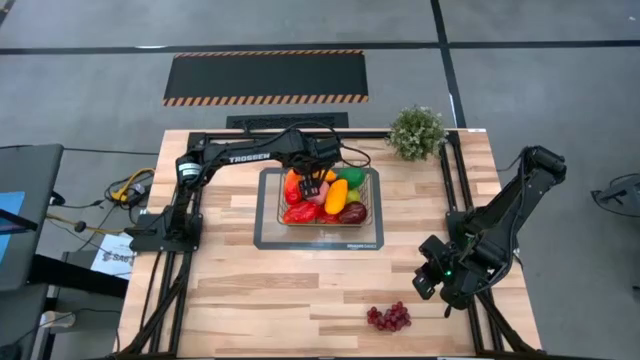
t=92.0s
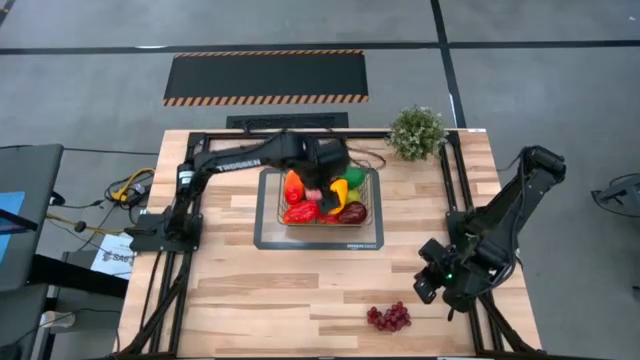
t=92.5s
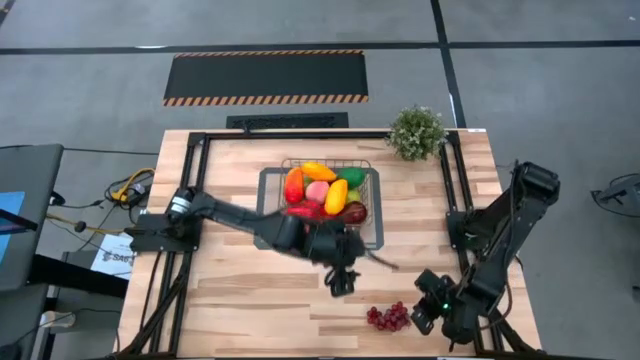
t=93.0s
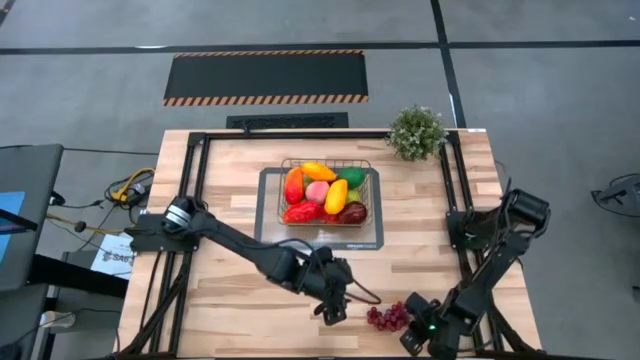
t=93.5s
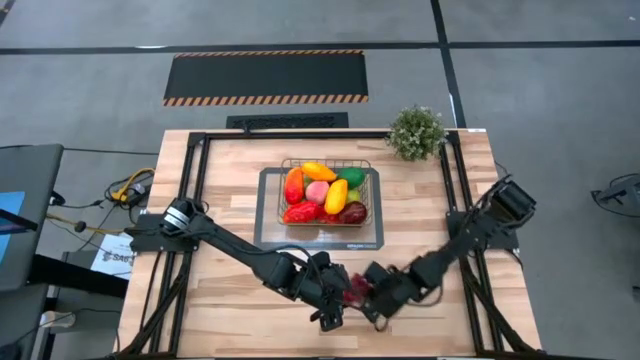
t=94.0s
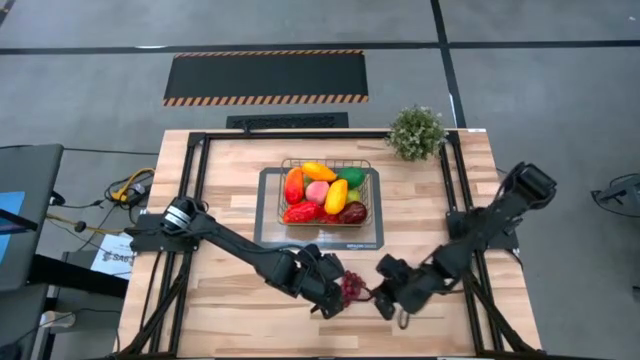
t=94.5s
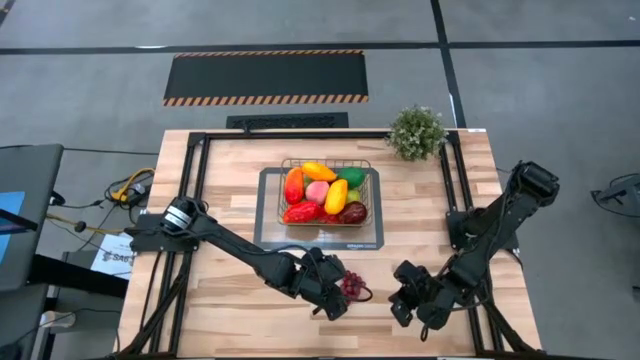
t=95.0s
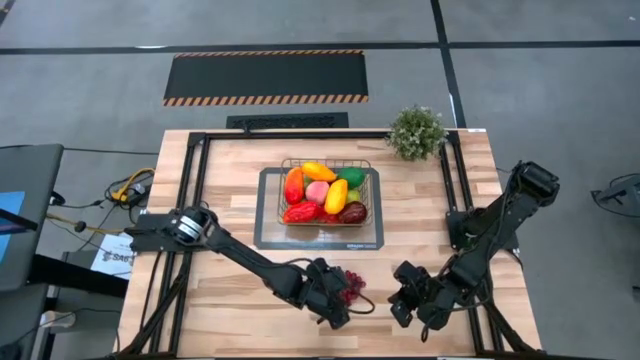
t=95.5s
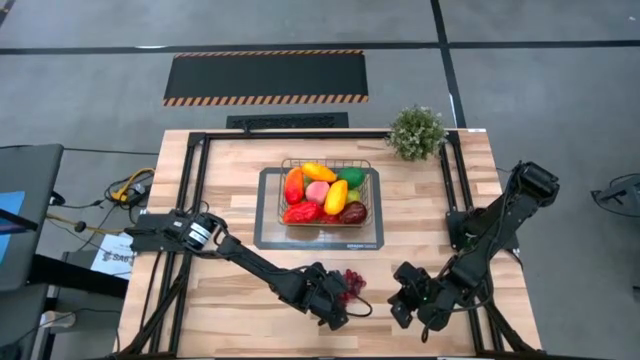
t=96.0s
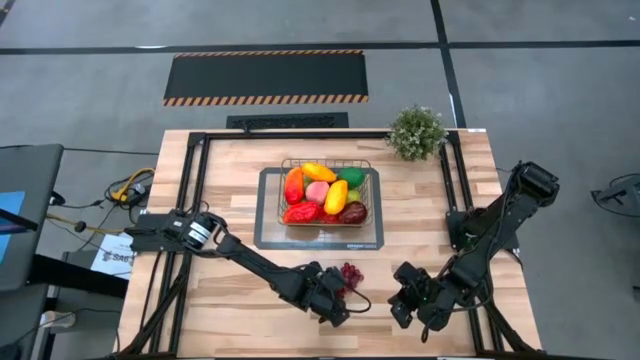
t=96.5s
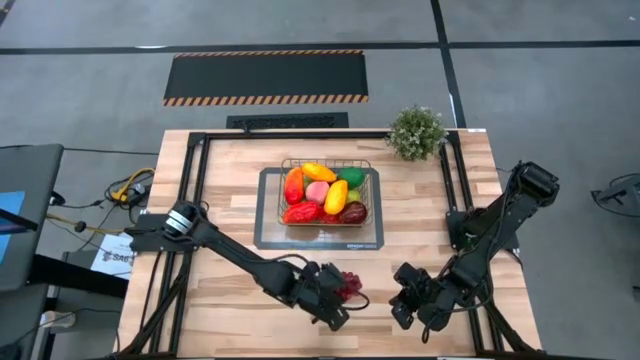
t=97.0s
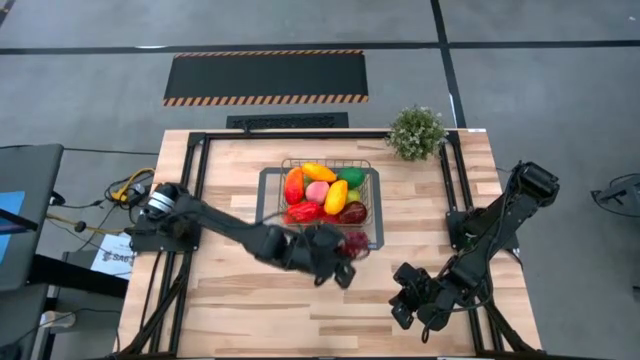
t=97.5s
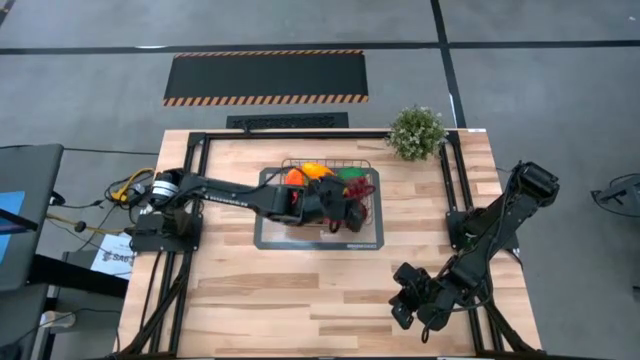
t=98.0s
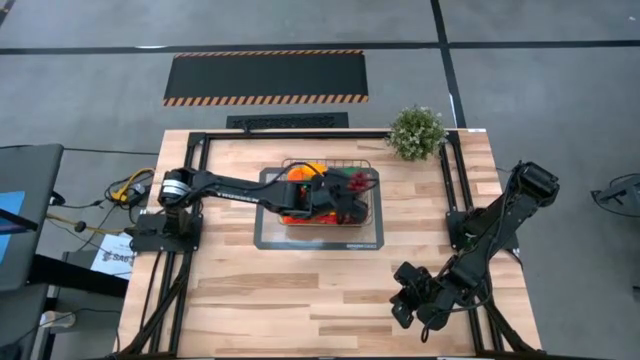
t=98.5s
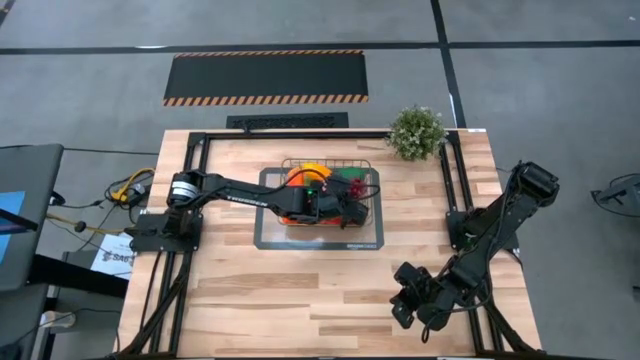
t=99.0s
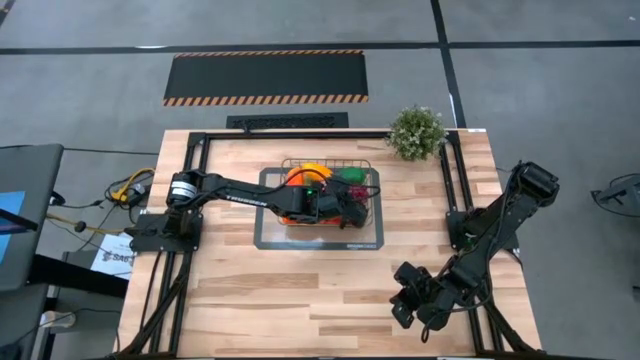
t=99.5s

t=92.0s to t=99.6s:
Task: Build produce basket
Put the red grapes into the bin

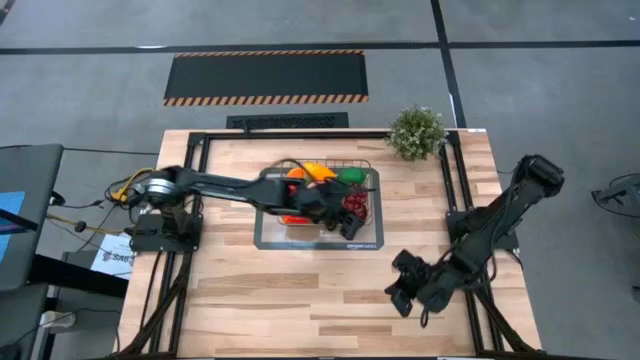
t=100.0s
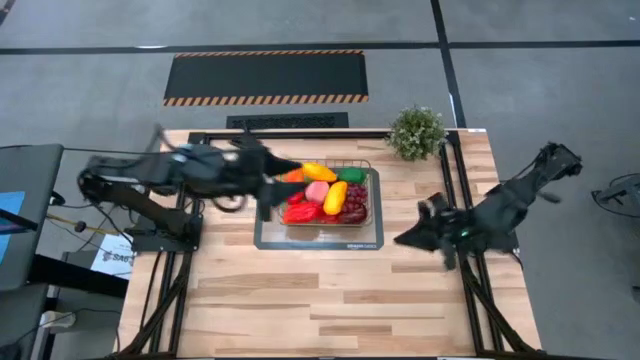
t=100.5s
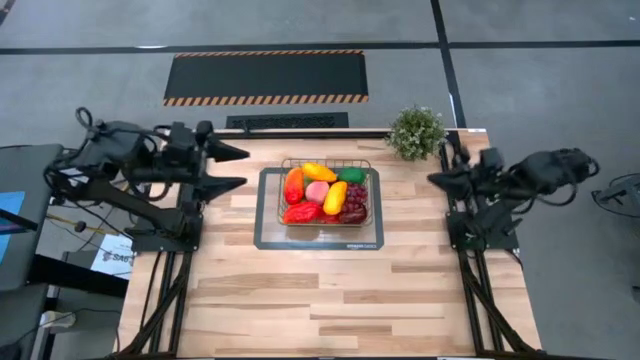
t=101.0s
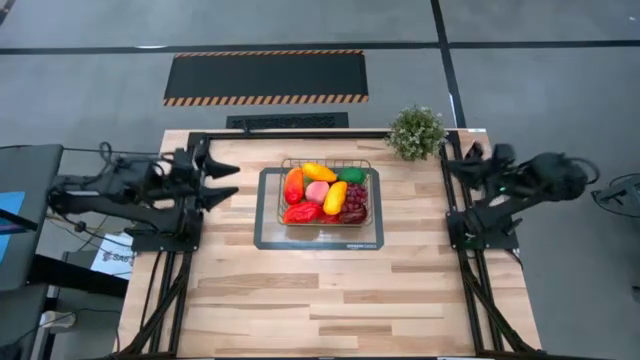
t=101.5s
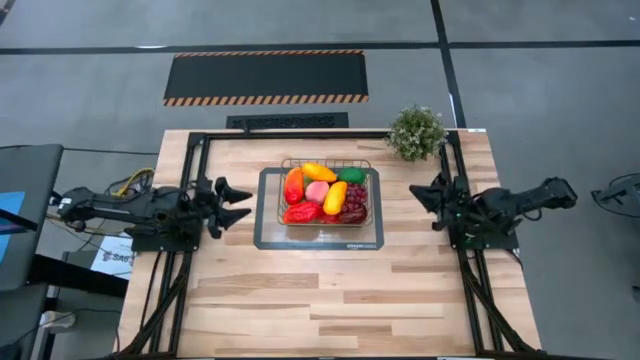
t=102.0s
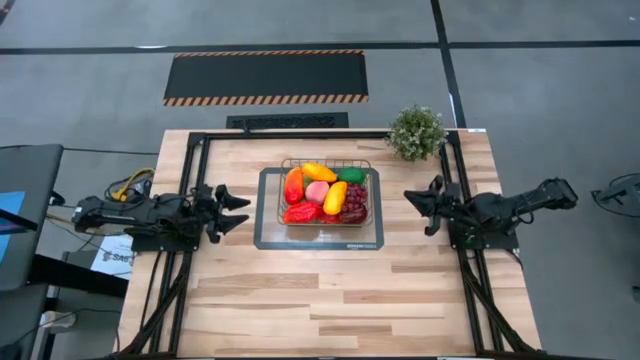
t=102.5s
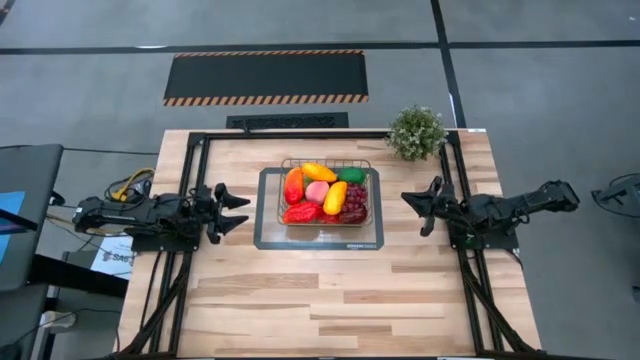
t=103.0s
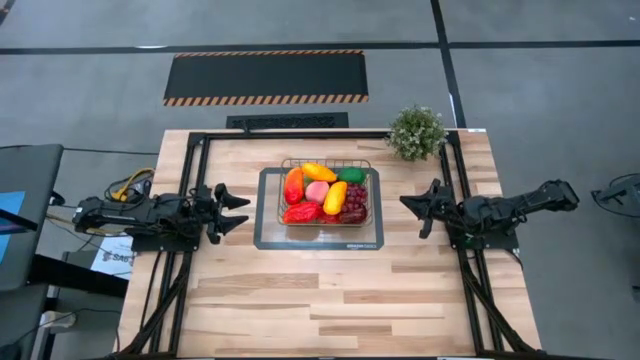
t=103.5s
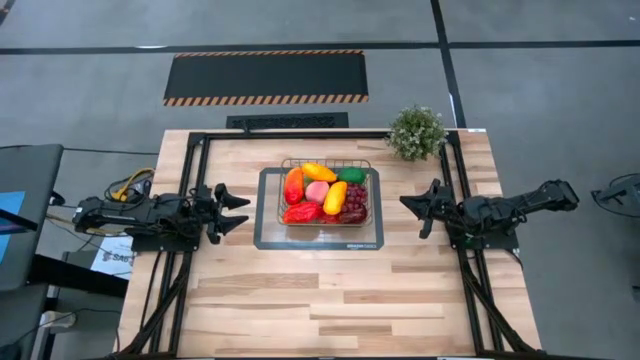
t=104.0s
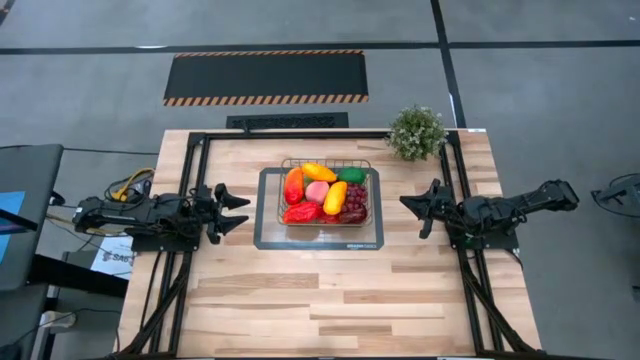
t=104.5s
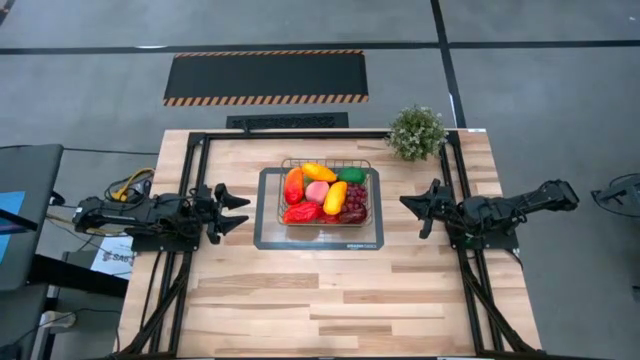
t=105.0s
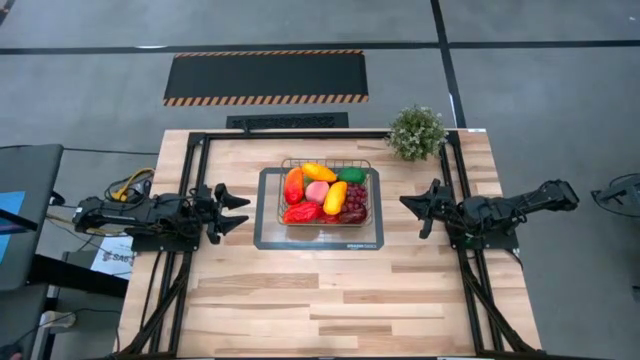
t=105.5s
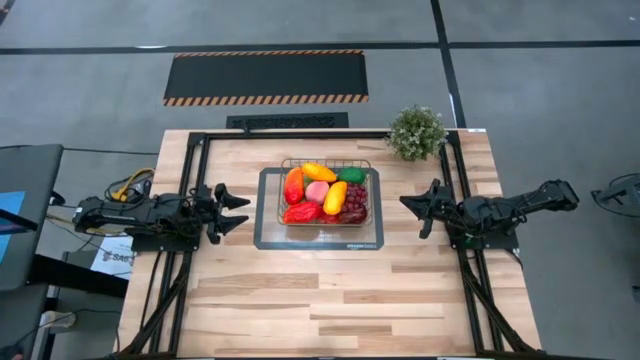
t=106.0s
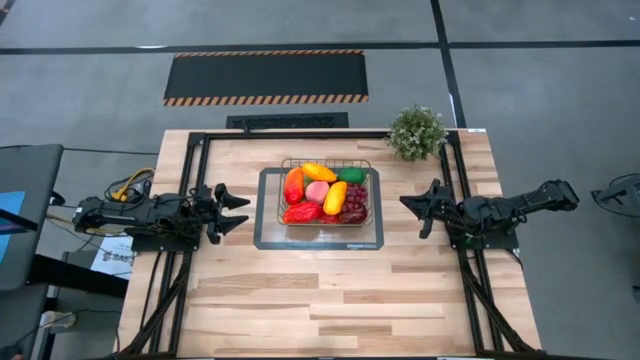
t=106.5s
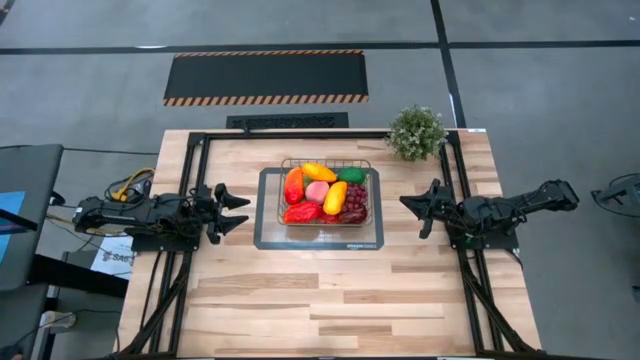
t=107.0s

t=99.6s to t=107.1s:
Return to Home Position

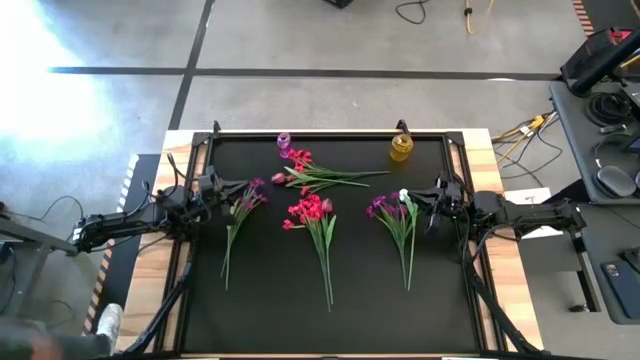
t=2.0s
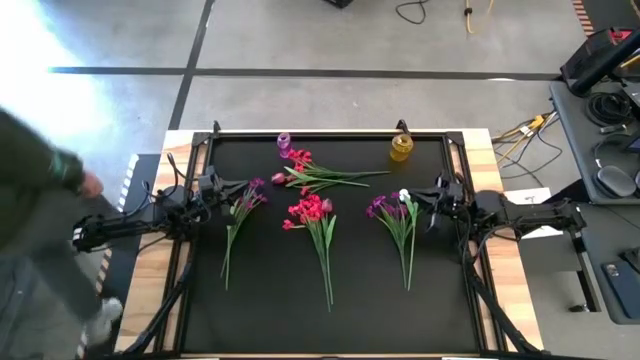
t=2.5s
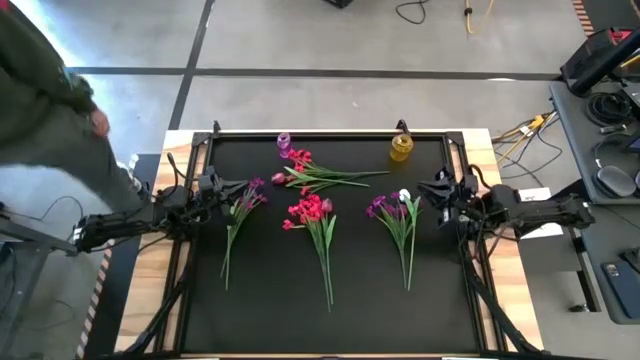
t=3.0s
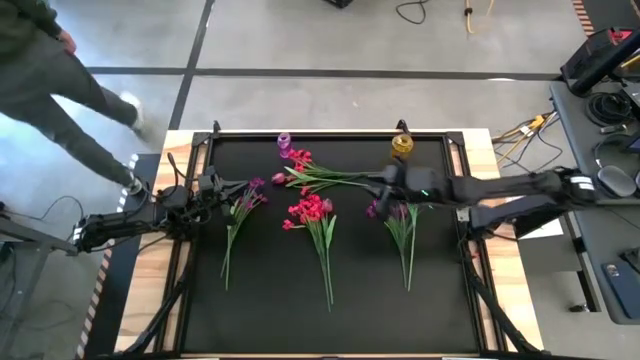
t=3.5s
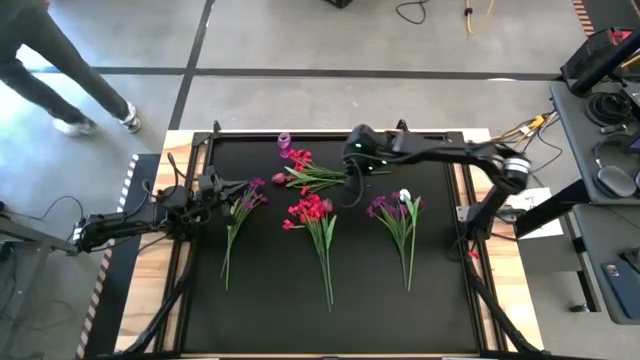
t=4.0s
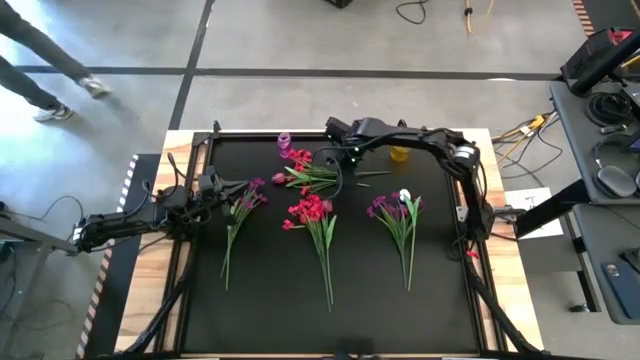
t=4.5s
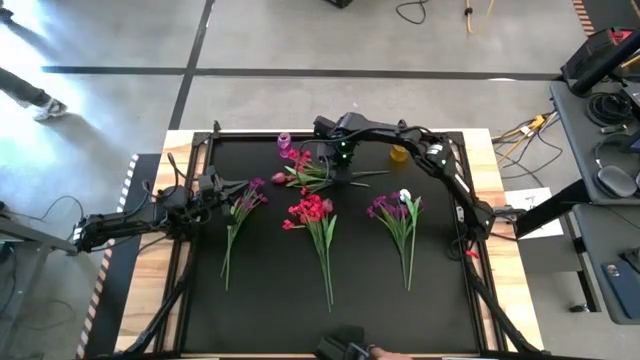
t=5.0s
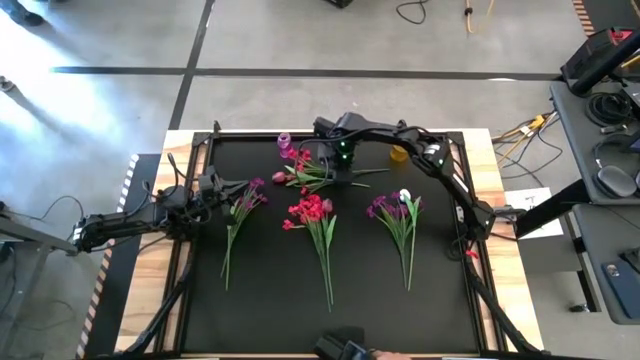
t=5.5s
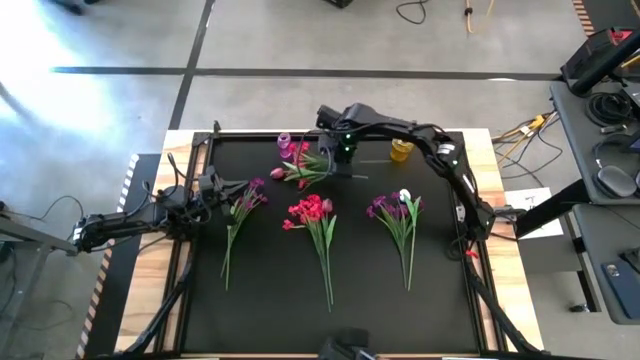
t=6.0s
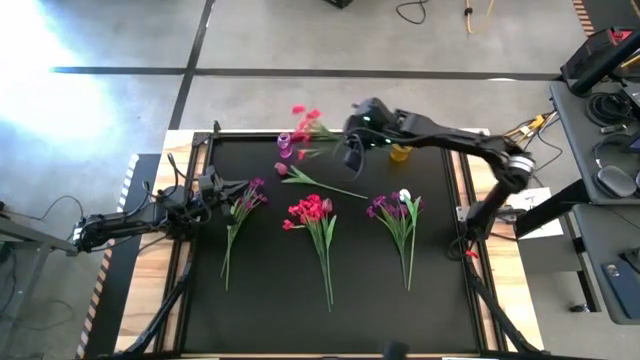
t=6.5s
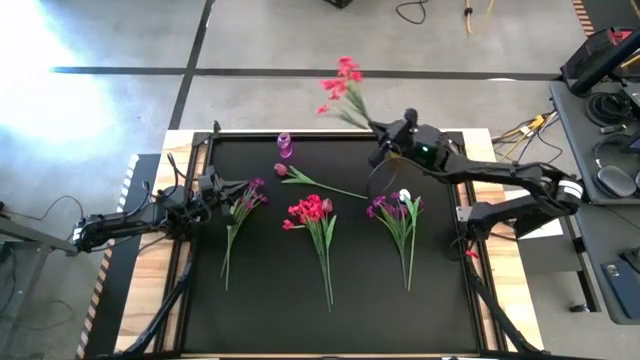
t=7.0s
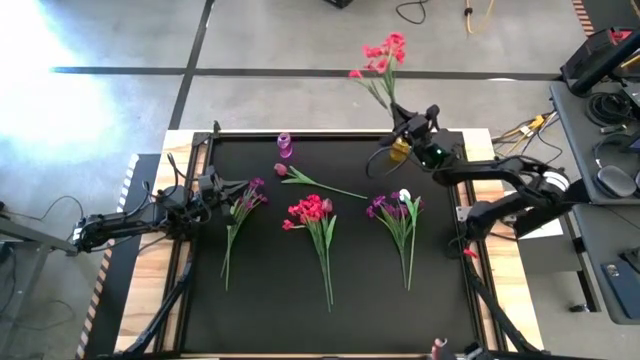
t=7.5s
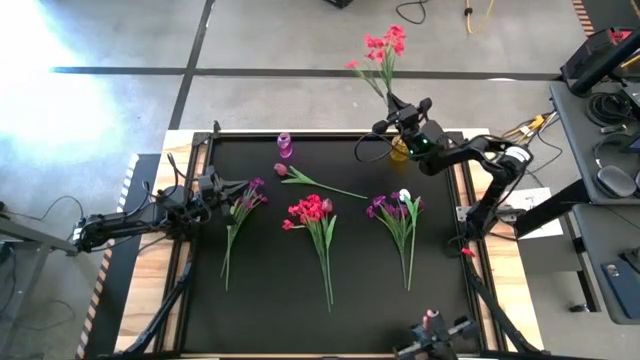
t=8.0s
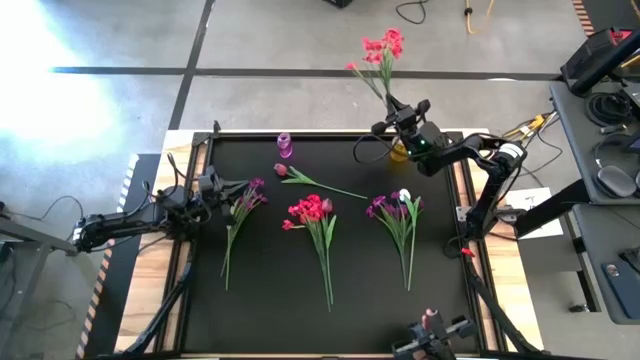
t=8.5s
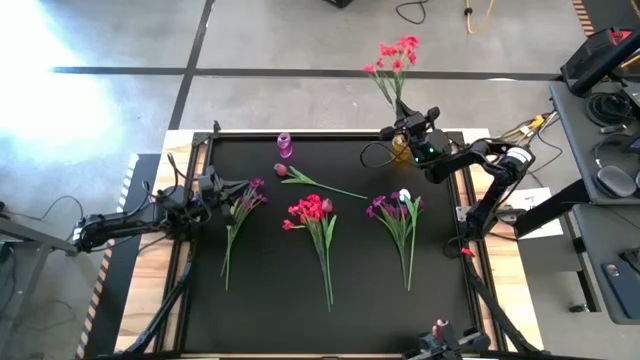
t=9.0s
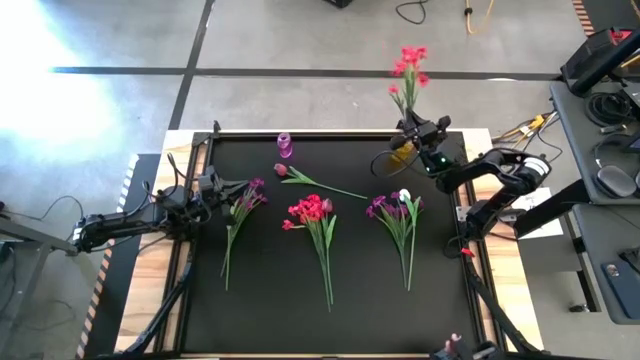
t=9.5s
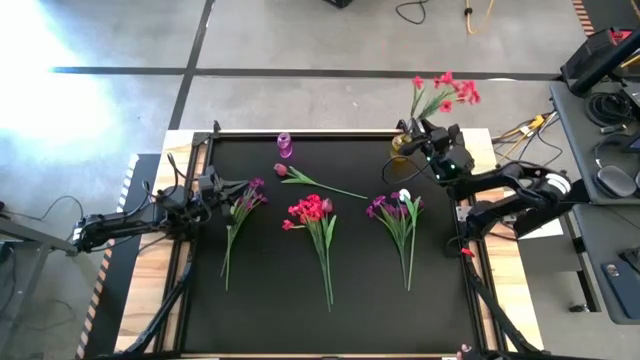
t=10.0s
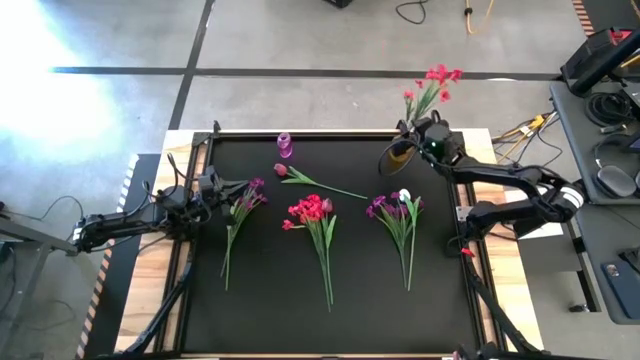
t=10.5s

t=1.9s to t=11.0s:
Task: Sort flowers into vase by color
Put the top bouquet of red flowers into the yellow vase
